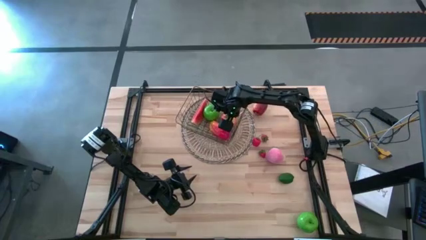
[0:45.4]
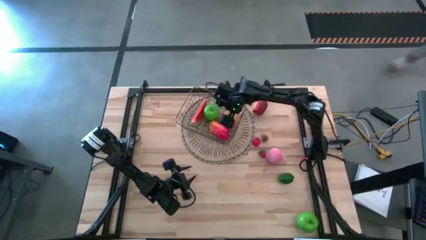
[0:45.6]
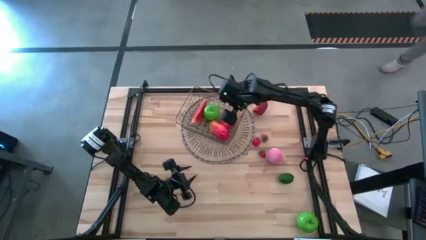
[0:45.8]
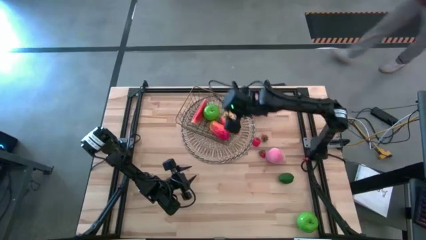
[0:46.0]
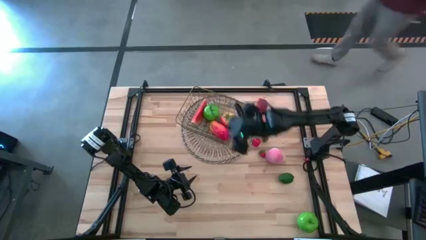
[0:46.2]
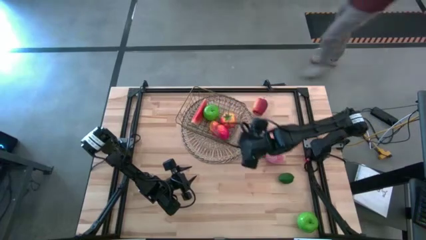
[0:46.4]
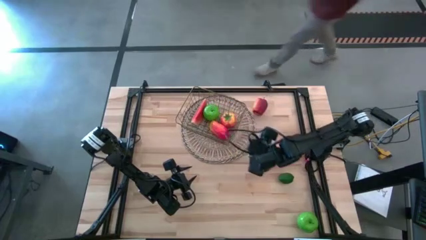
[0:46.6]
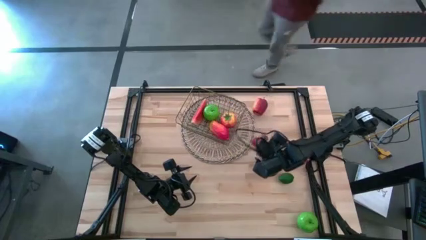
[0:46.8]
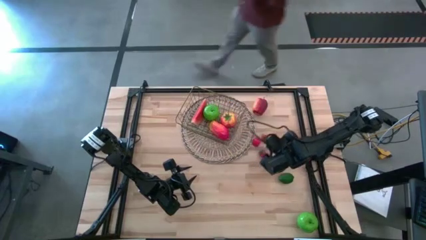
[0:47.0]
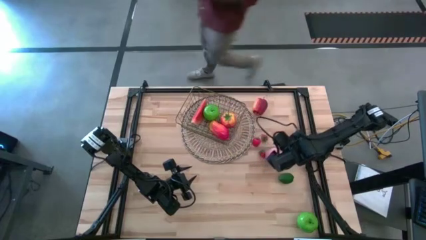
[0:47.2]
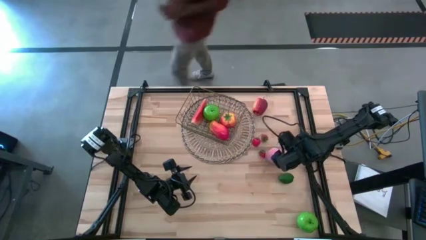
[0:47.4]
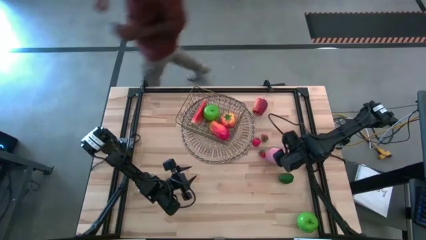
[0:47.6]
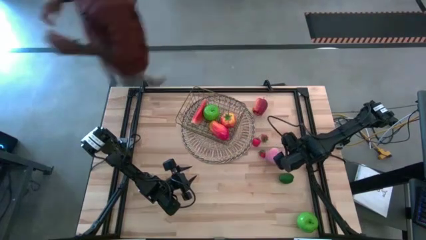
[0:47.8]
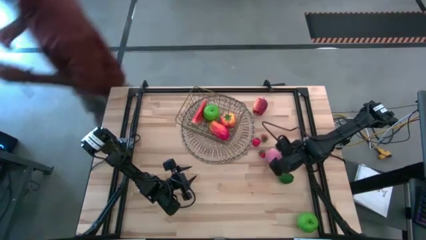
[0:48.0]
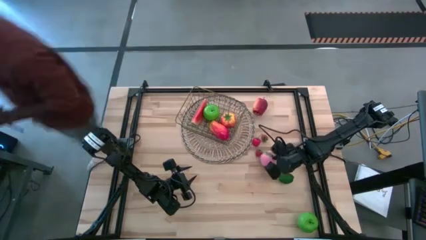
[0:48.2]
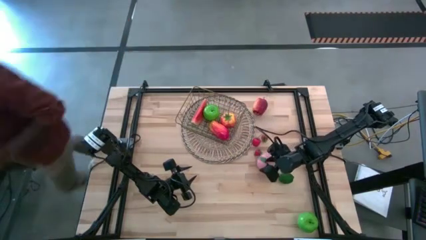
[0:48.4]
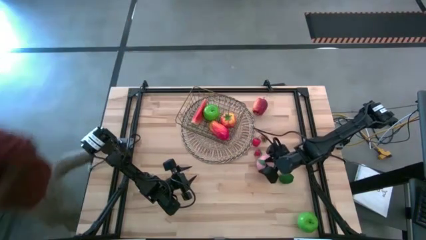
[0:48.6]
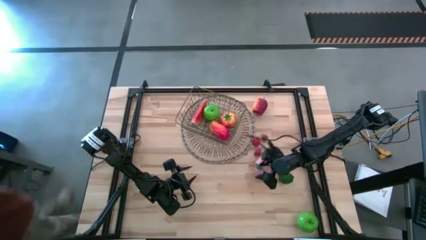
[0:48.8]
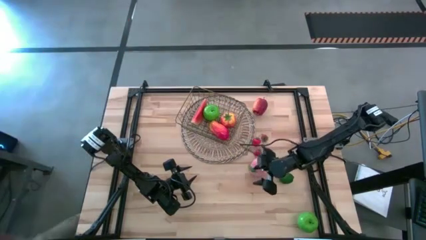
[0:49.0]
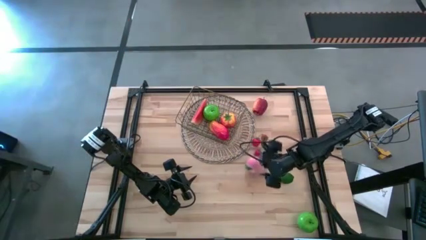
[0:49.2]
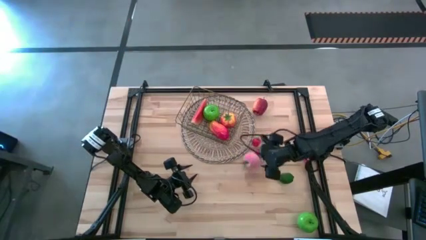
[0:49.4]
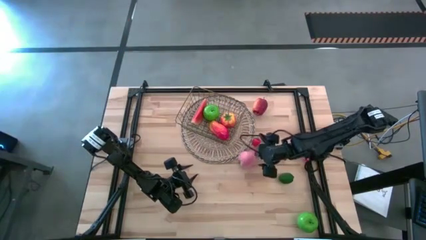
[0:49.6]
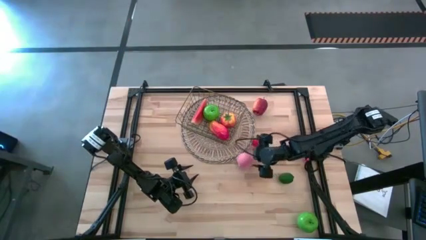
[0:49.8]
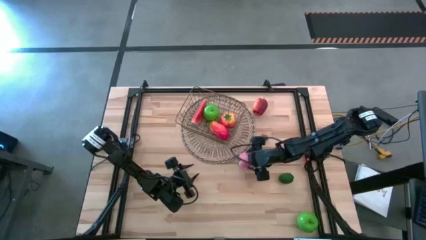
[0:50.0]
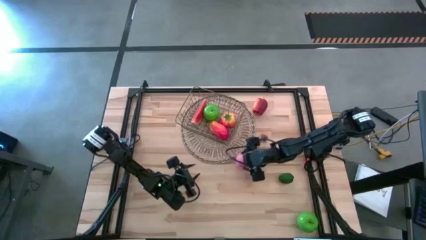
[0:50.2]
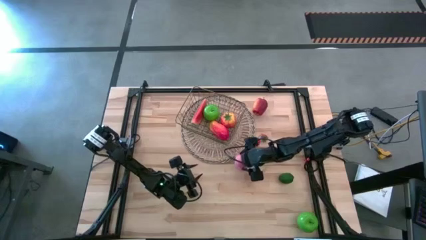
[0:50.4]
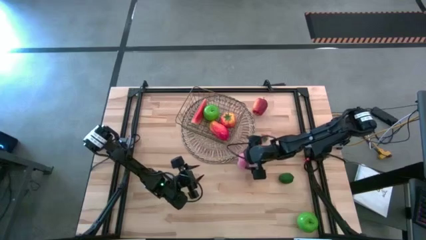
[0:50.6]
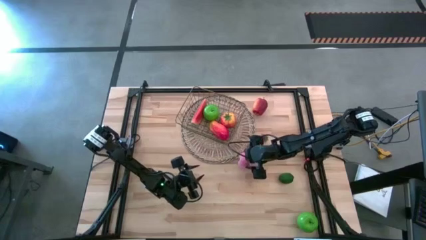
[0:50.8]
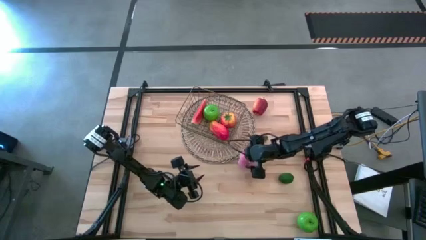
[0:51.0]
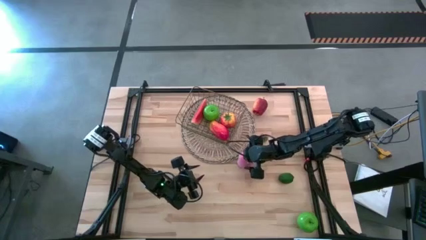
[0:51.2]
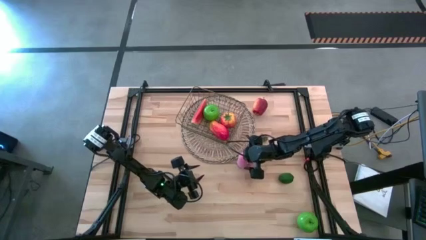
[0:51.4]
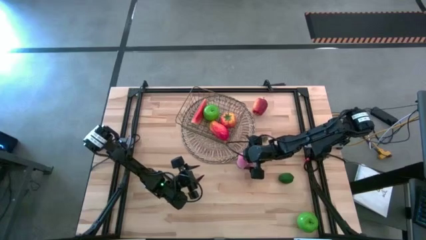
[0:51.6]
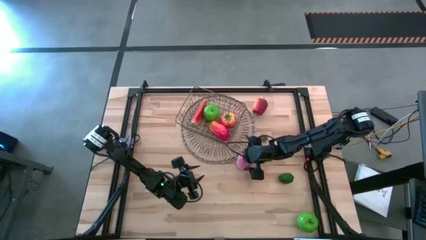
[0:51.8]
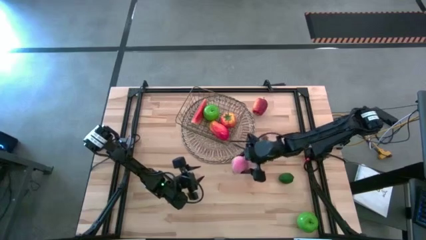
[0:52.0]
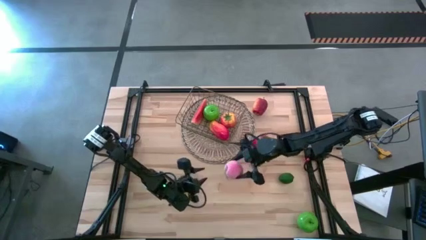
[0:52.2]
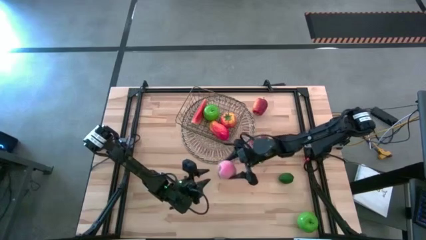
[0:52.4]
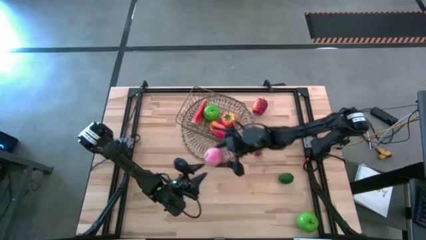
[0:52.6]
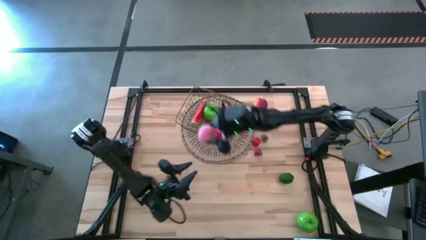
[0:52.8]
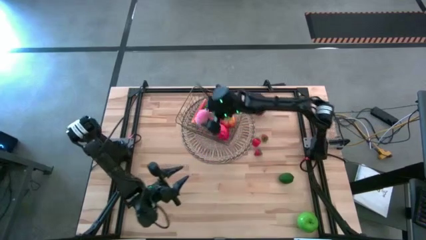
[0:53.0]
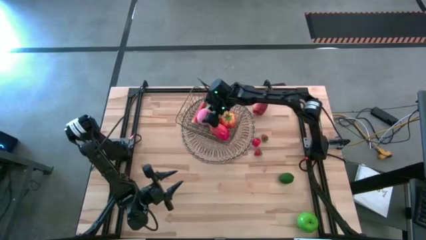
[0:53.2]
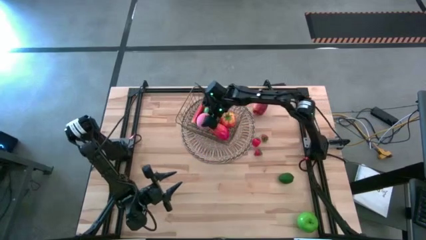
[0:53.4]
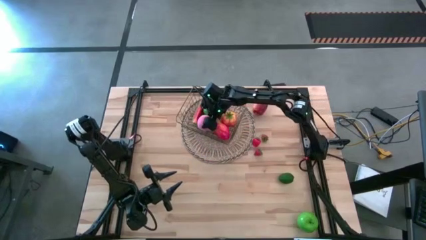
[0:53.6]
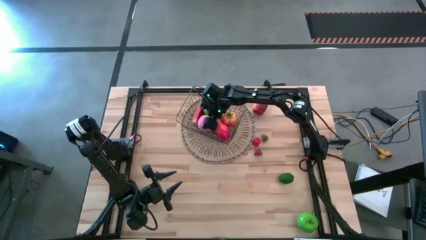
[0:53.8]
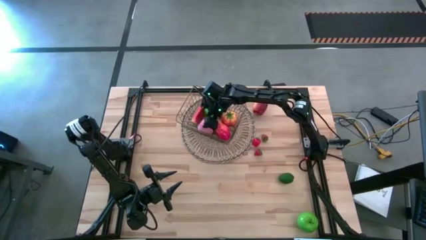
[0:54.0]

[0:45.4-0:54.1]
Task: Build produce basket
Put the pink peach into the gold wire basket

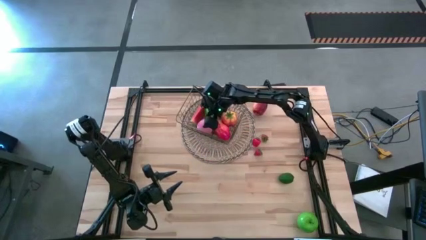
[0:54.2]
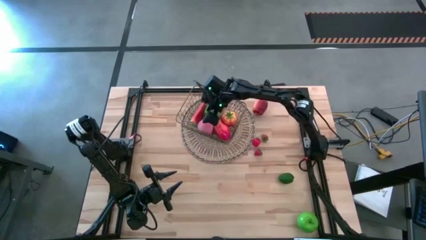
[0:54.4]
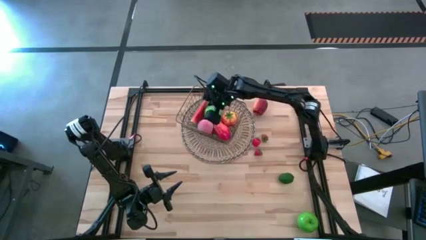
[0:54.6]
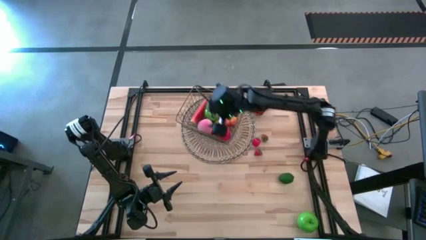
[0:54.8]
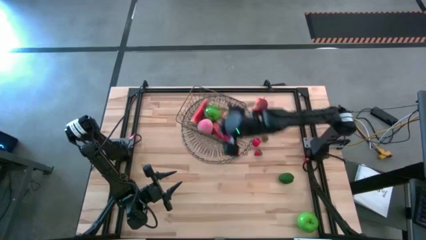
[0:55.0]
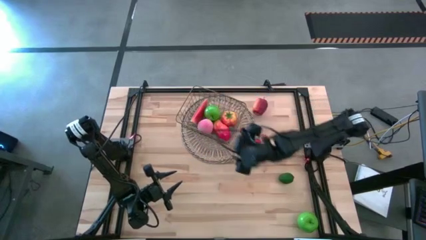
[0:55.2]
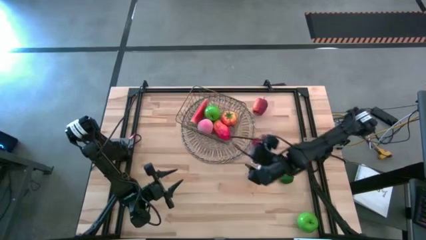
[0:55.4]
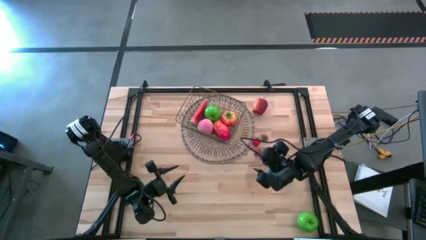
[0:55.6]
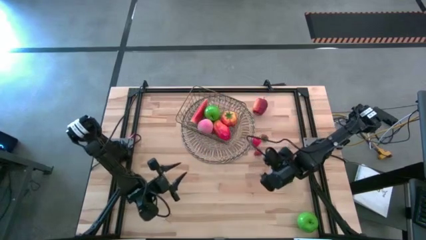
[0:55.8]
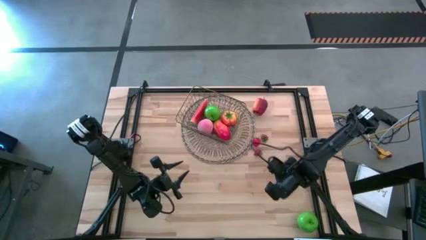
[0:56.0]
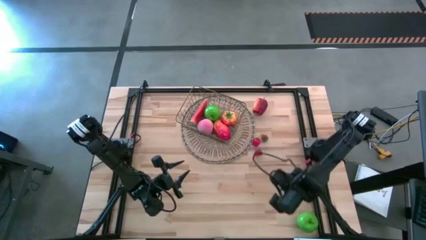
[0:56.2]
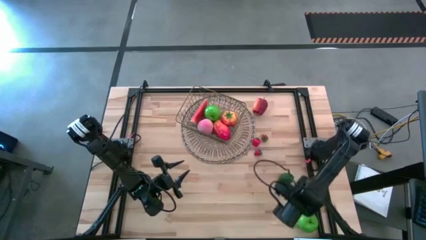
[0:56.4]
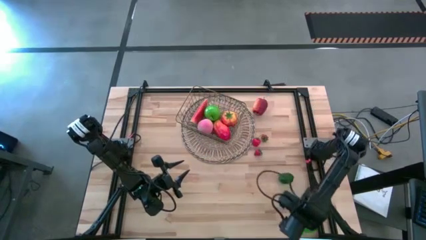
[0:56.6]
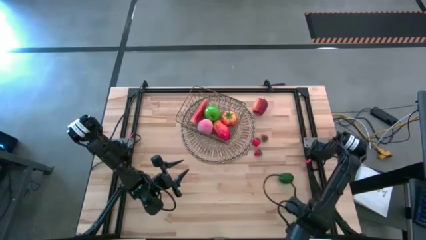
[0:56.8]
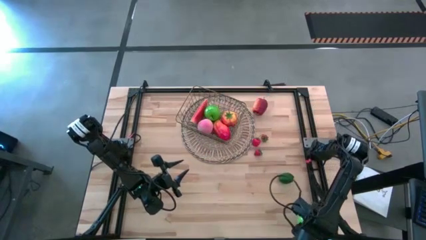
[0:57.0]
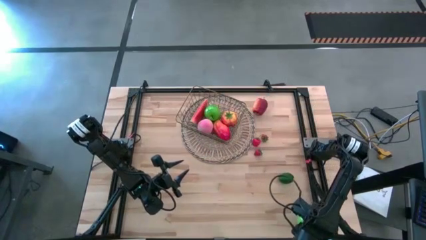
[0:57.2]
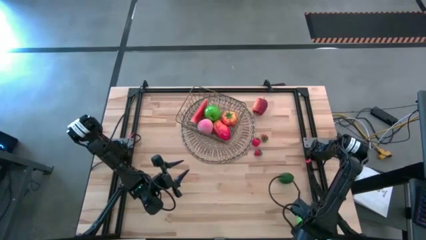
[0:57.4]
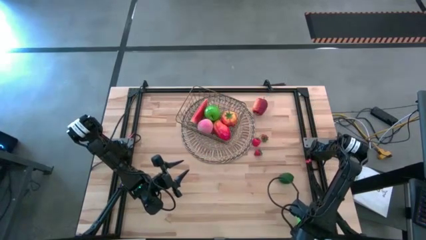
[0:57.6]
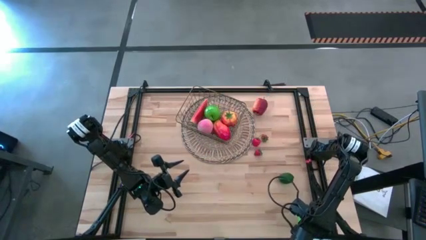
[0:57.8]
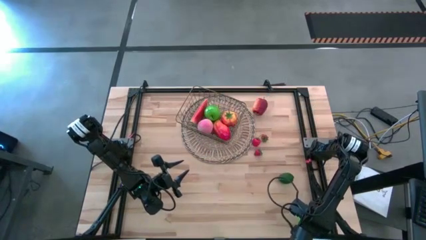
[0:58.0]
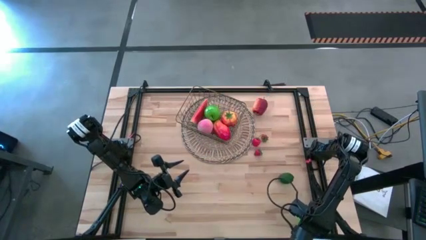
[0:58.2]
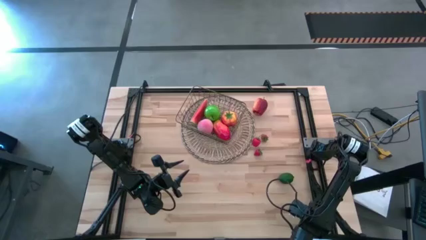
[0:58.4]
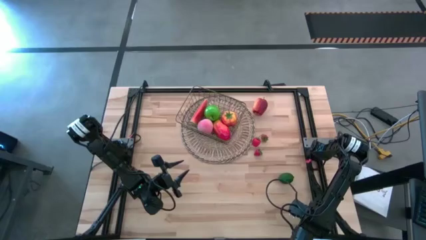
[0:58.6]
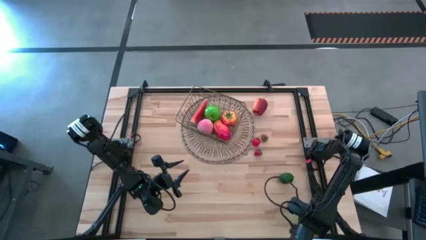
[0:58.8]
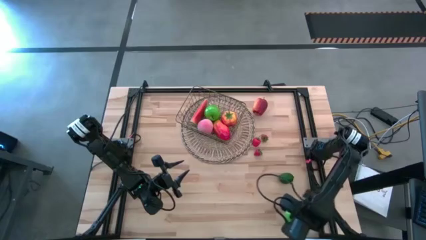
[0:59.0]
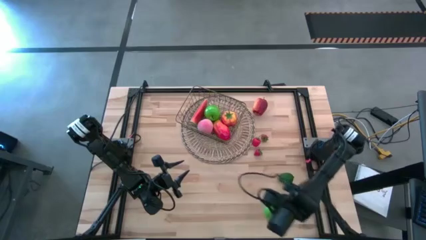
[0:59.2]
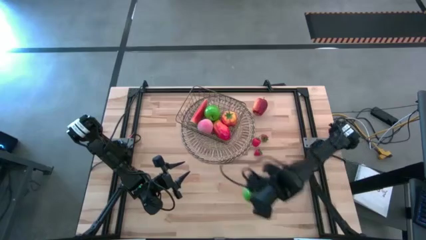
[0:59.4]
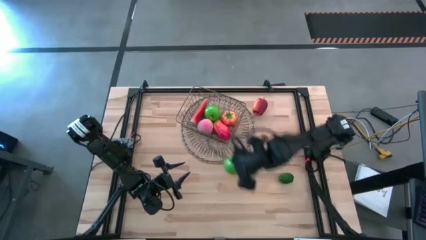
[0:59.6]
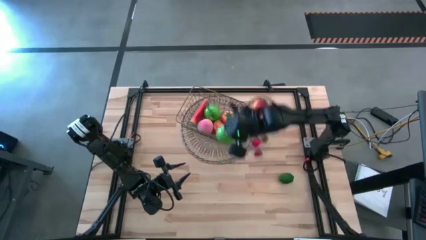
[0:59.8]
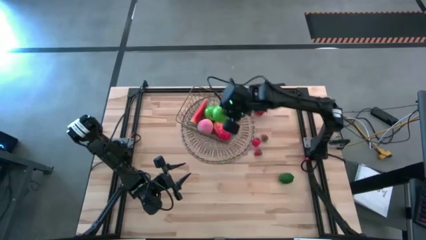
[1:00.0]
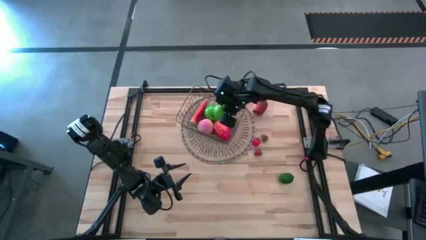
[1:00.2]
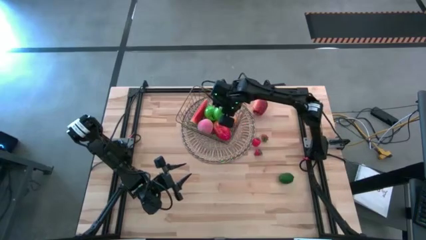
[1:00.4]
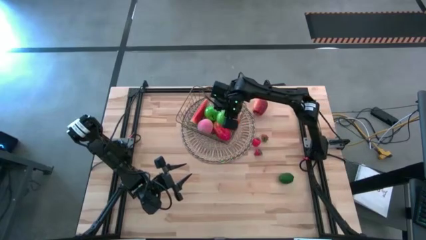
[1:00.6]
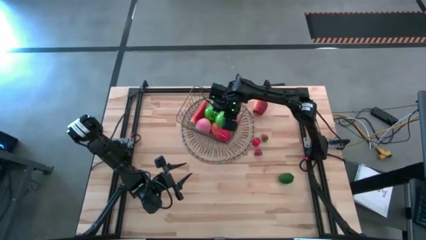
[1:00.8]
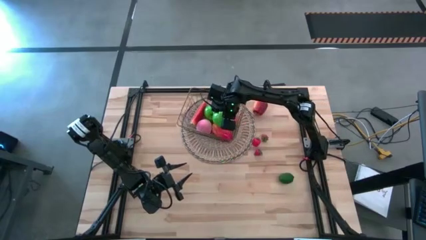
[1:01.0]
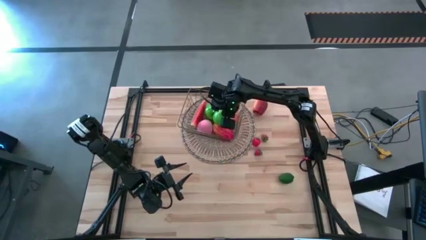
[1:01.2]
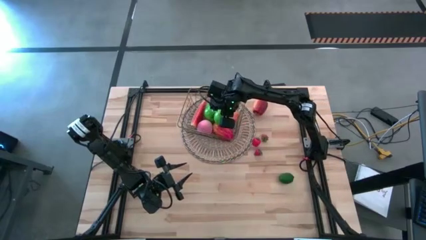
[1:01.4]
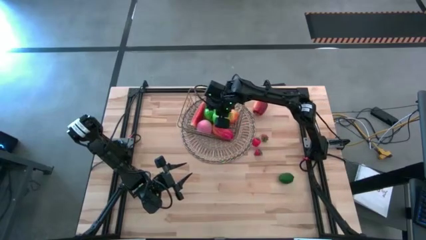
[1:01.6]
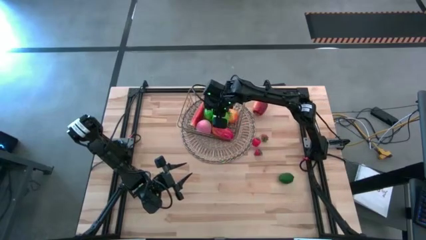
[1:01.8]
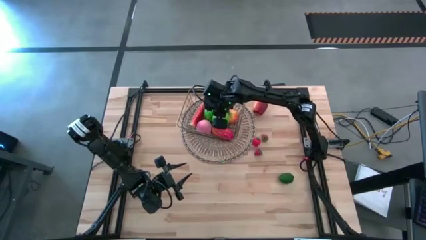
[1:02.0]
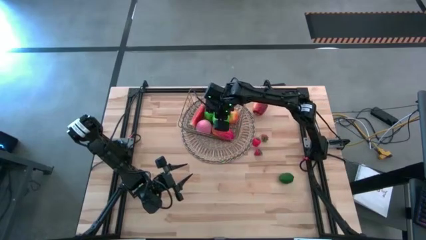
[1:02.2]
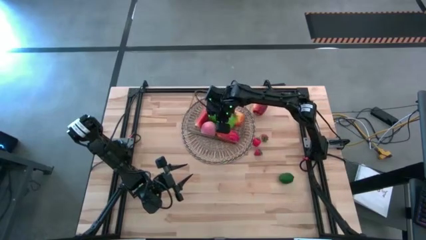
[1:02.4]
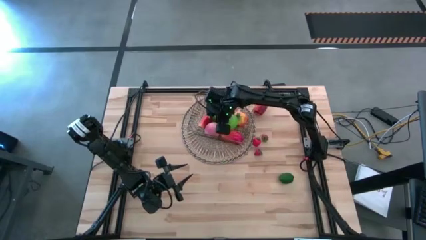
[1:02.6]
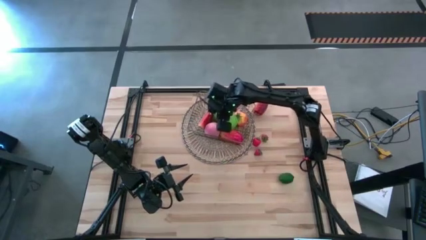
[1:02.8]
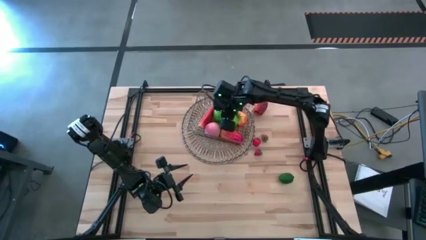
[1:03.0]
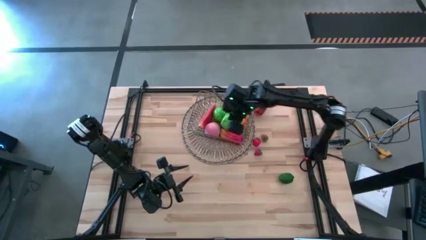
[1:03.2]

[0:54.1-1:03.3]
Put the green apple into the gold wire basket
